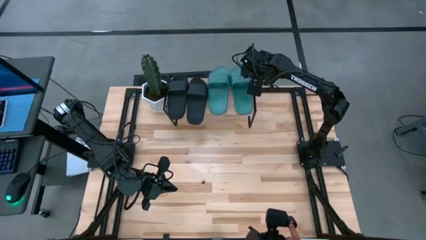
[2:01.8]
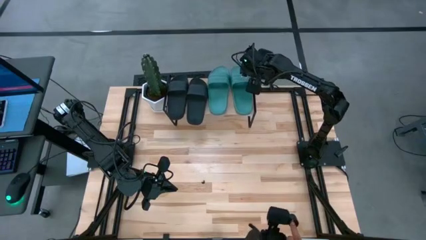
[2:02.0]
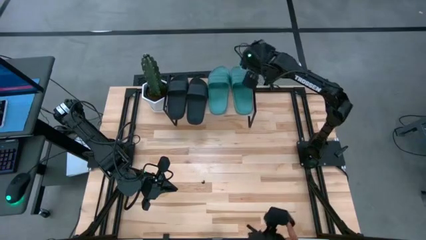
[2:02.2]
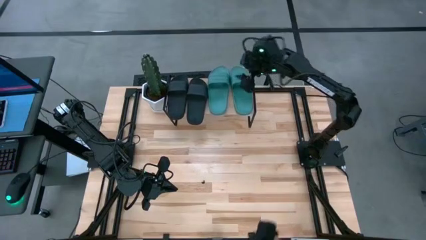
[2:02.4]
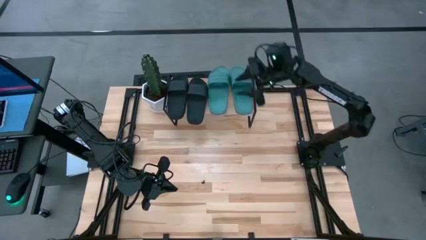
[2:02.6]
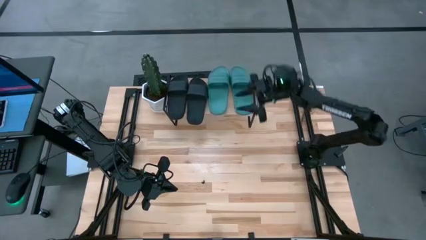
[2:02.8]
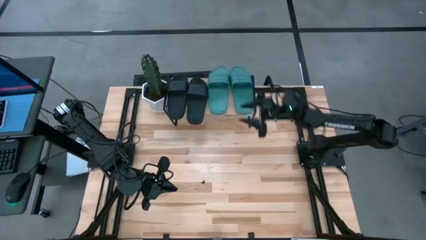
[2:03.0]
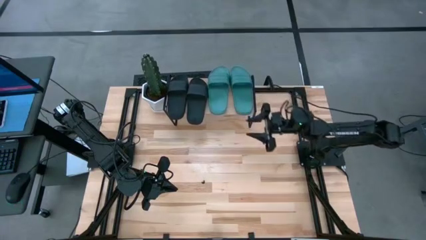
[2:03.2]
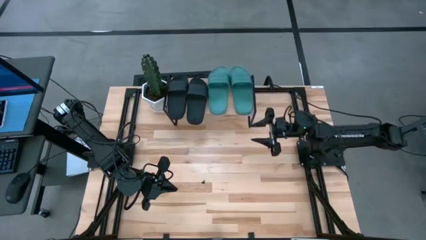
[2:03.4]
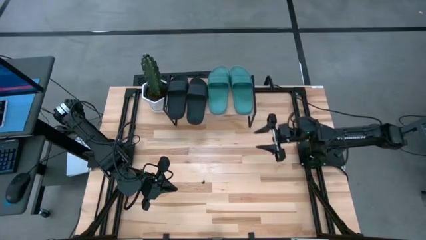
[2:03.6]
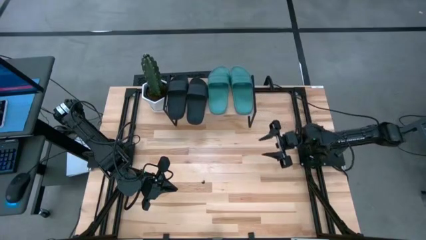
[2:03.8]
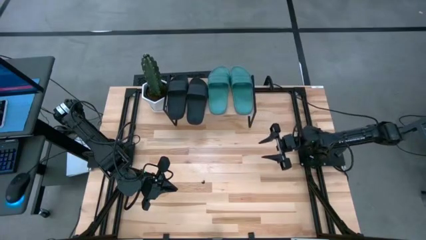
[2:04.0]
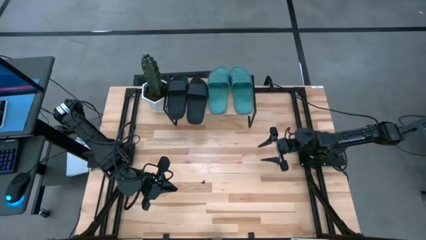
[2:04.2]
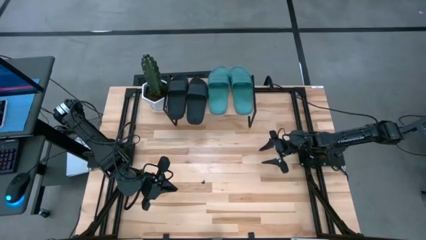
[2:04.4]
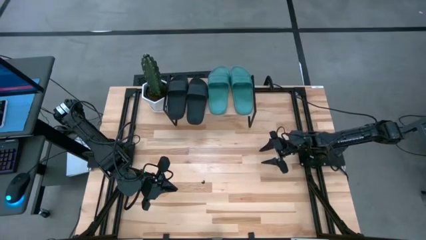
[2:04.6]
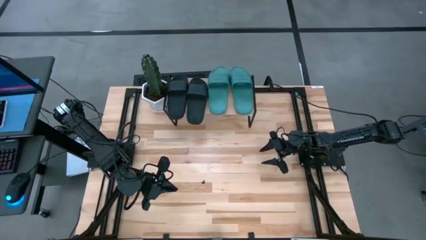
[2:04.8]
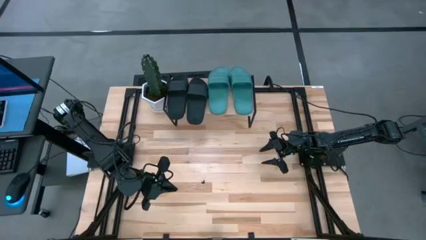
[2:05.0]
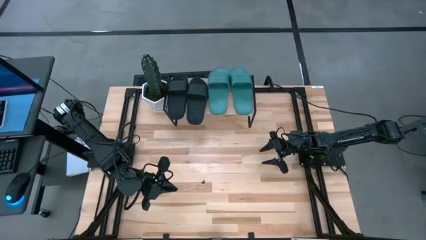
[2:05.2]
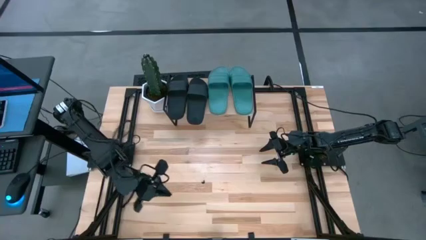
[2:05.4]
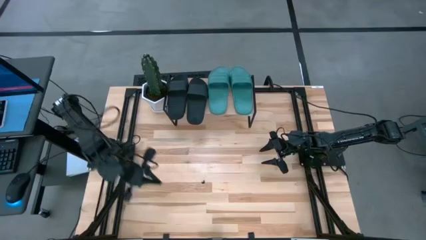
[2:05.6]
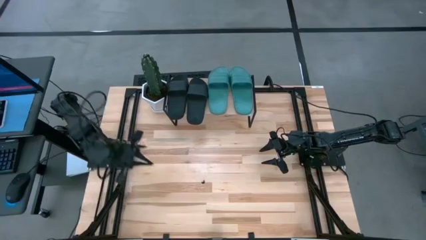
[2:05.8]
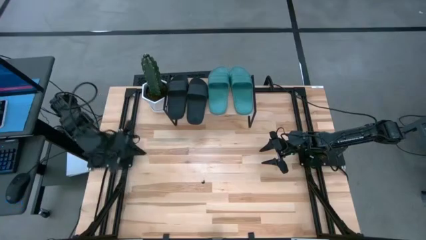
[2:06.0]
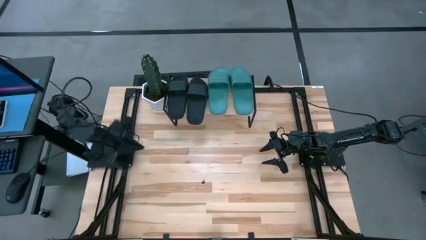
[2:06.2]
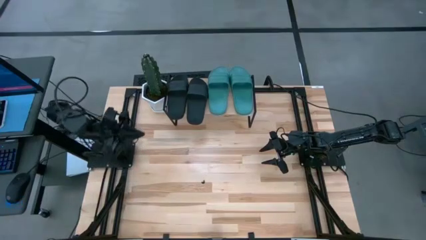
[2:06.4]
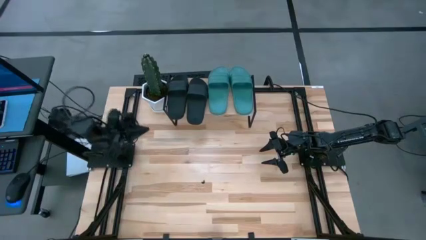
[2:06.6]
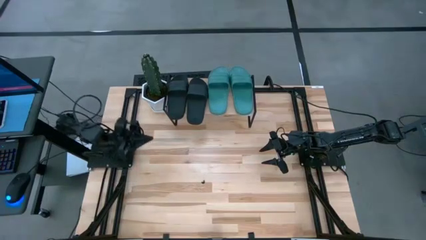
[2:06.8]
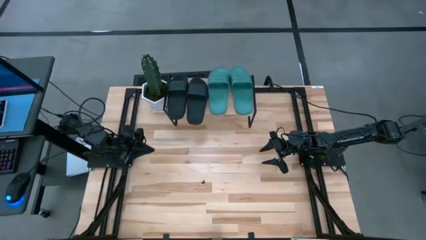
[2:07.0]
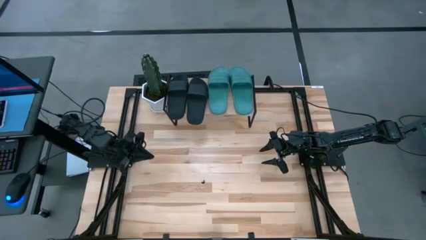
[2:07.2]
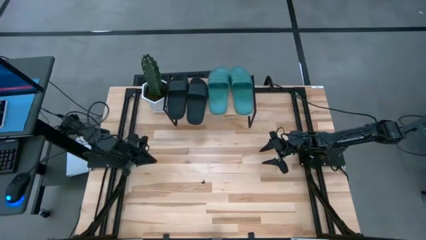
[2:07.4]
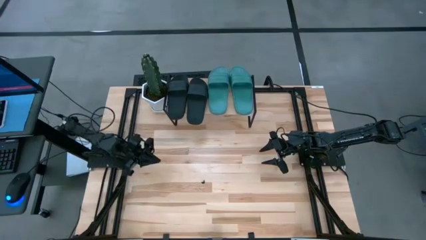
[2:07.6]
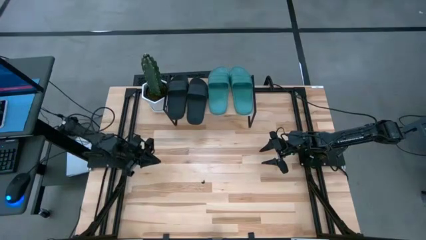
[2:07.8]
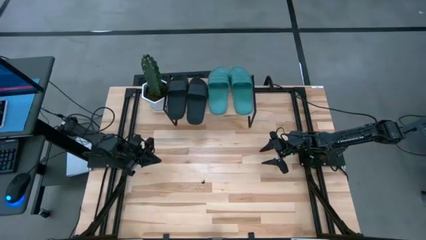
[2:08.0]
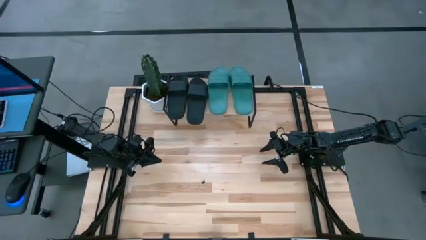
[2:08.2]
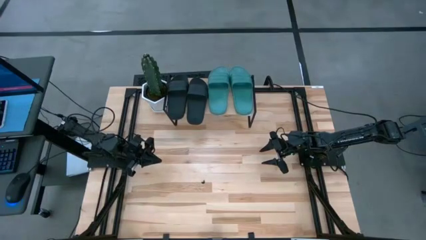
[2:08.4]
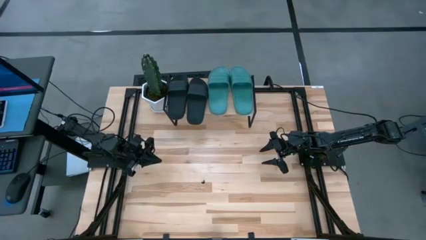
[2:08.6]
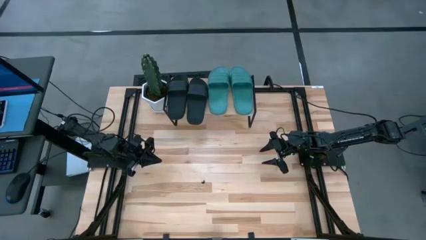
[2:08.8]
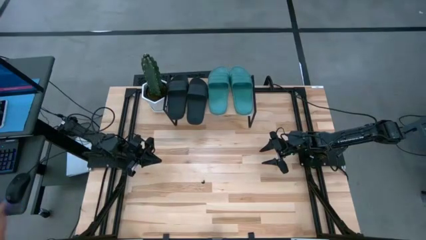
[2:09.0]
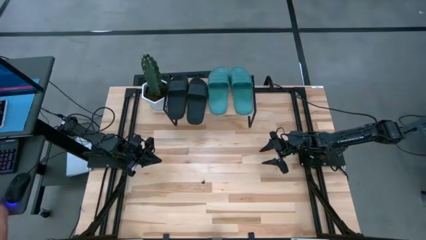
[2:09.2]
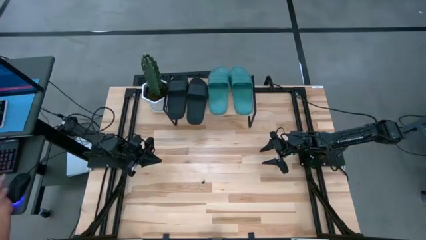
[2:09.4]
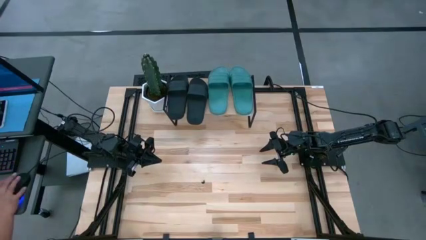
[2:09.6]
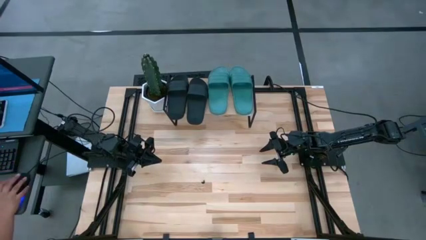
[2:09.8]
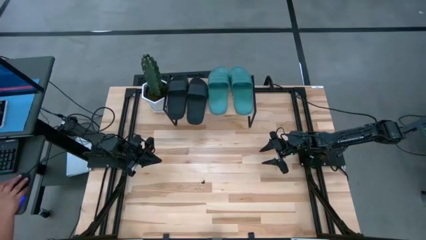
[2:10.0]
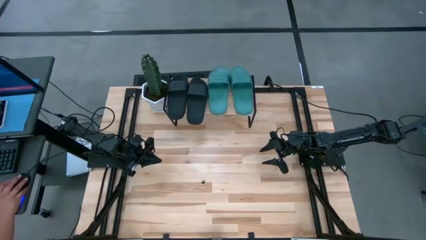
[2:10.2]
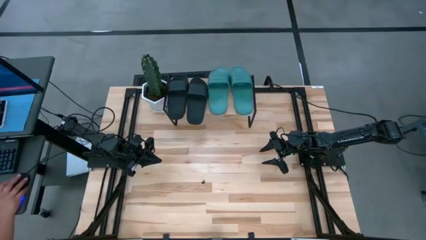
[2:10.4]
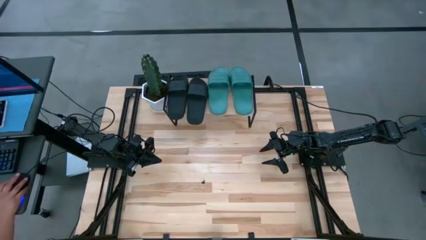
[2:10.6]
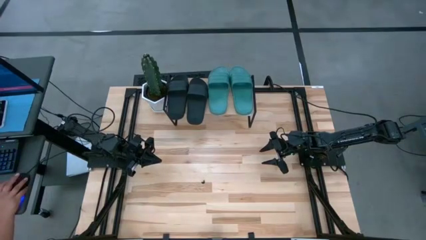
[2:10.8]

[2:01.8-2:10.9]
Task: Pick and place slides into the shelf
Return to Home Position

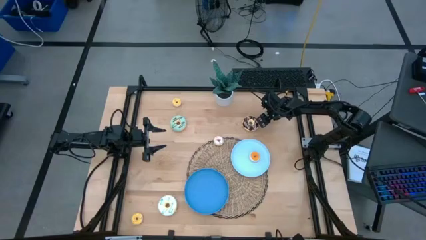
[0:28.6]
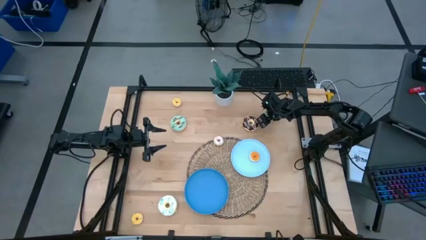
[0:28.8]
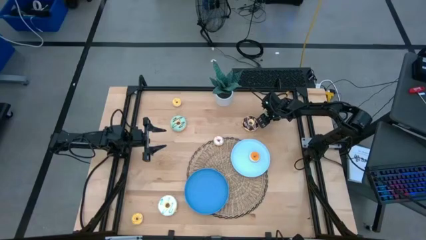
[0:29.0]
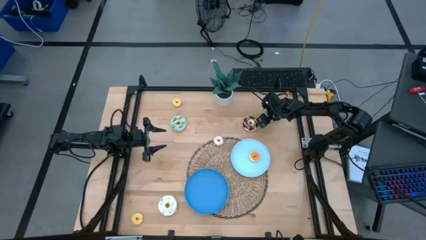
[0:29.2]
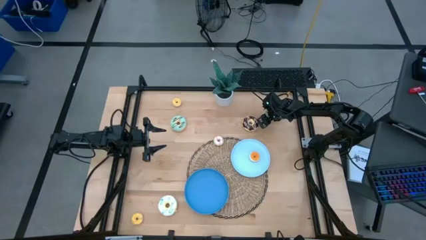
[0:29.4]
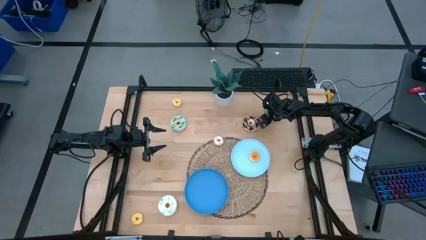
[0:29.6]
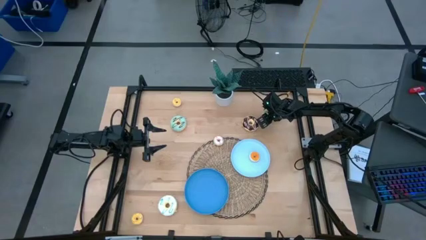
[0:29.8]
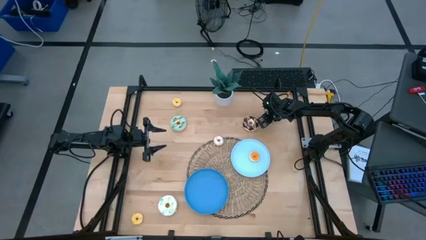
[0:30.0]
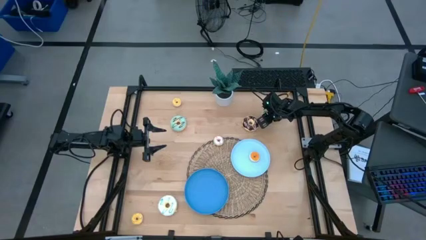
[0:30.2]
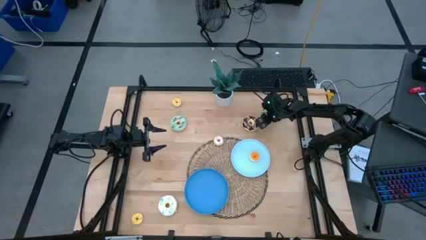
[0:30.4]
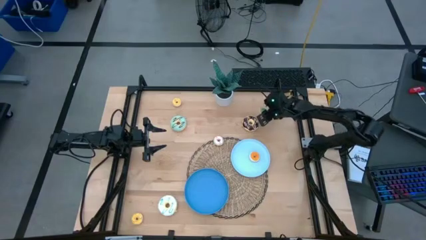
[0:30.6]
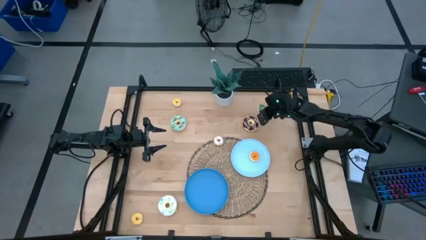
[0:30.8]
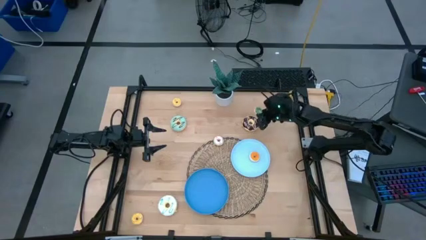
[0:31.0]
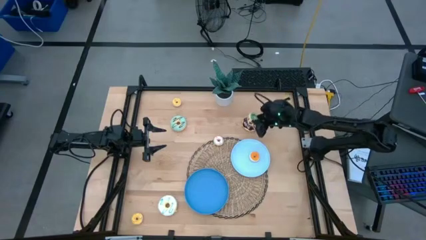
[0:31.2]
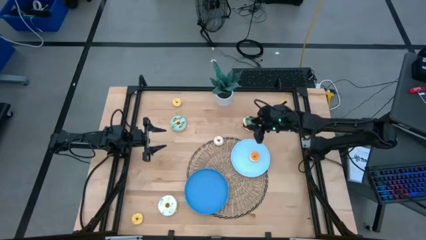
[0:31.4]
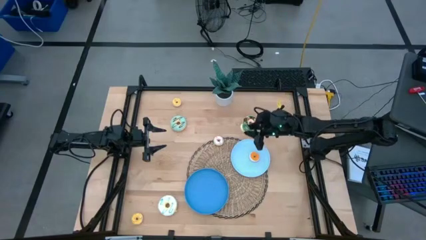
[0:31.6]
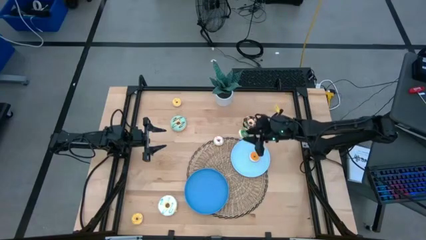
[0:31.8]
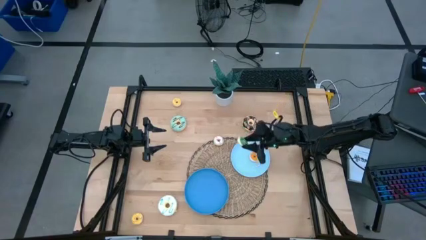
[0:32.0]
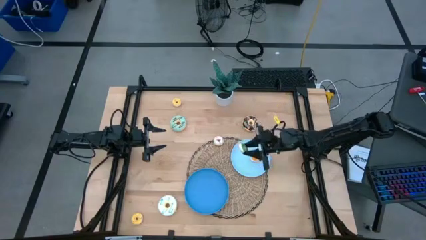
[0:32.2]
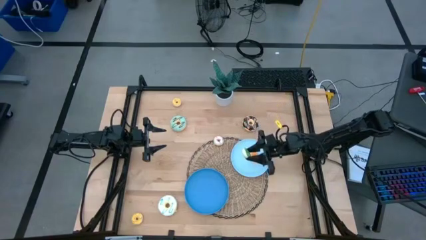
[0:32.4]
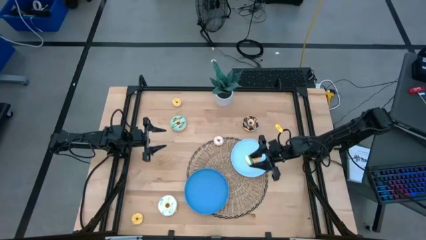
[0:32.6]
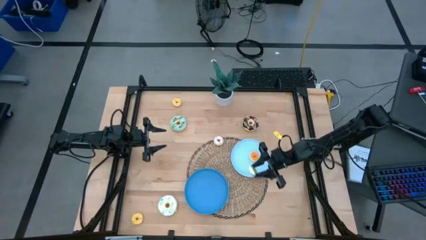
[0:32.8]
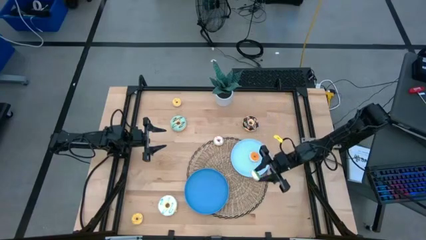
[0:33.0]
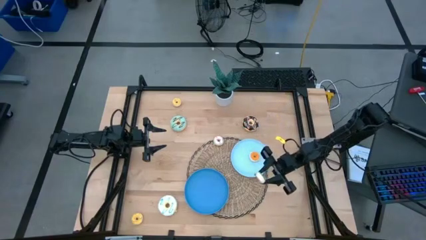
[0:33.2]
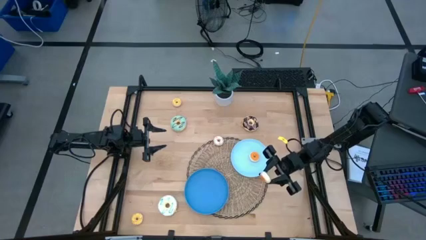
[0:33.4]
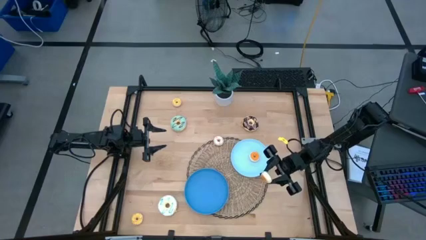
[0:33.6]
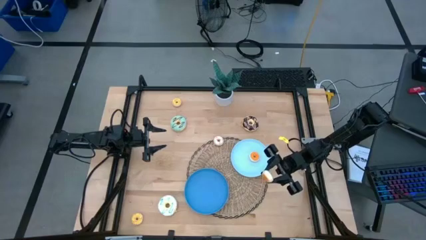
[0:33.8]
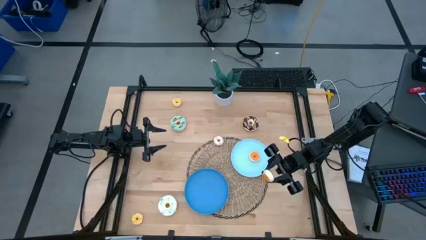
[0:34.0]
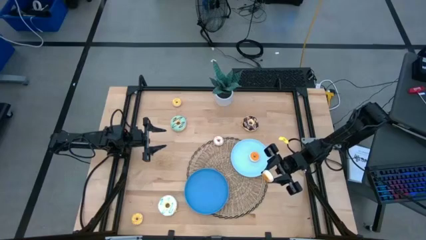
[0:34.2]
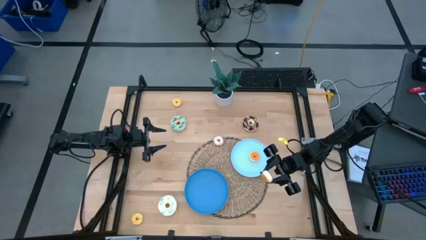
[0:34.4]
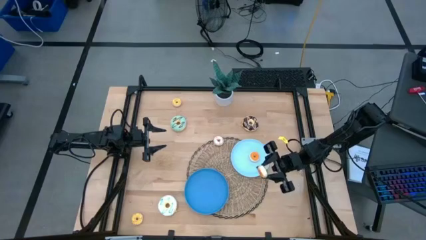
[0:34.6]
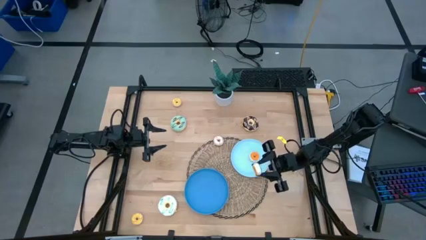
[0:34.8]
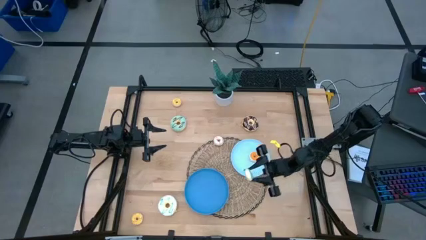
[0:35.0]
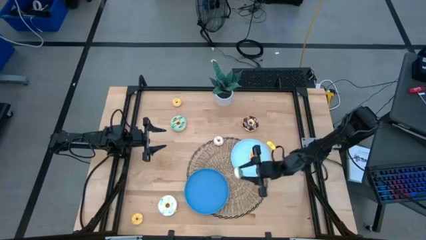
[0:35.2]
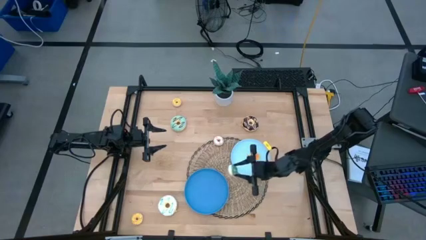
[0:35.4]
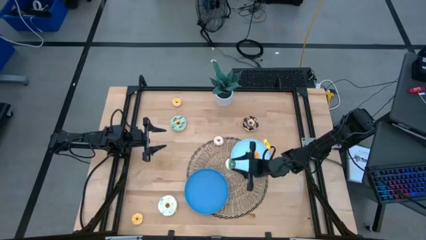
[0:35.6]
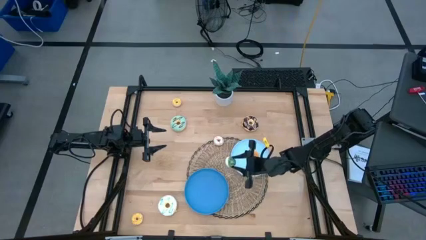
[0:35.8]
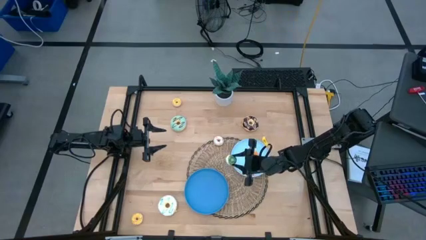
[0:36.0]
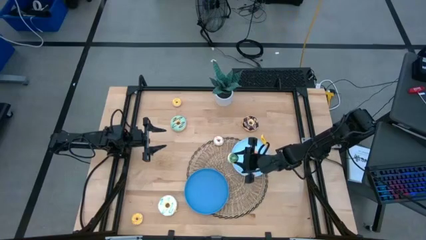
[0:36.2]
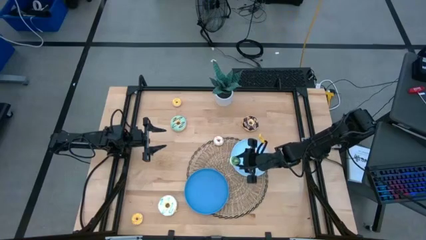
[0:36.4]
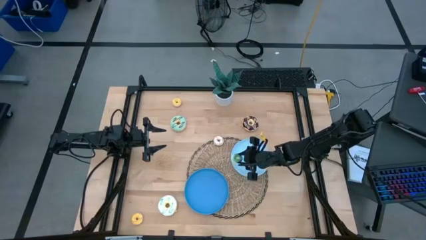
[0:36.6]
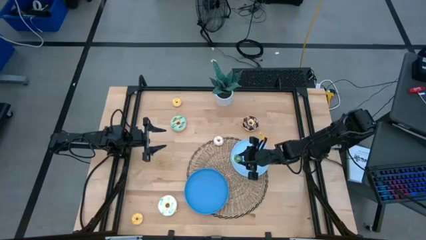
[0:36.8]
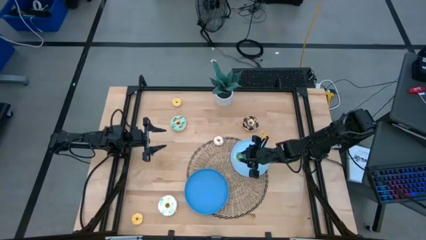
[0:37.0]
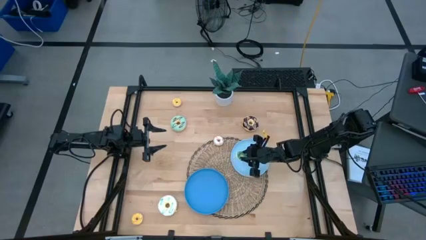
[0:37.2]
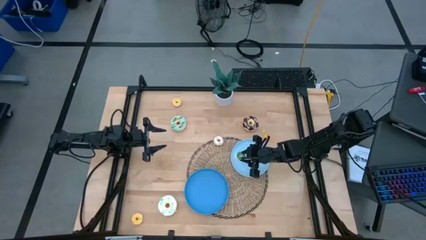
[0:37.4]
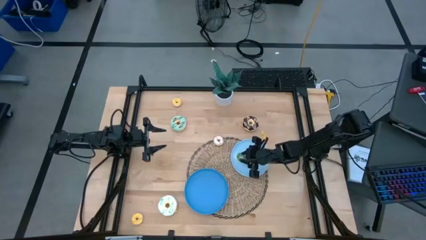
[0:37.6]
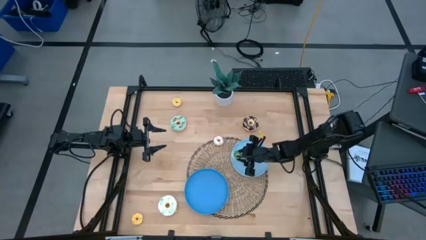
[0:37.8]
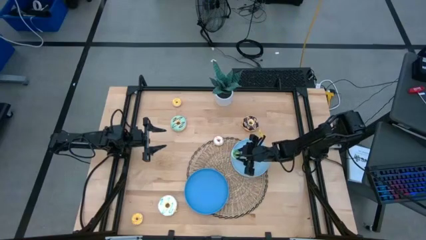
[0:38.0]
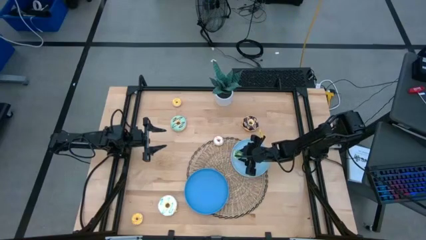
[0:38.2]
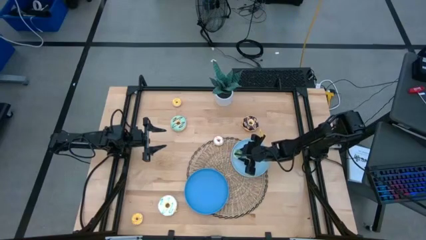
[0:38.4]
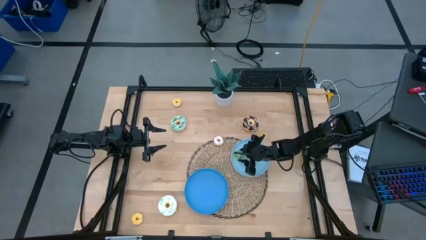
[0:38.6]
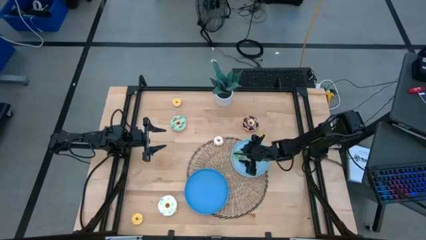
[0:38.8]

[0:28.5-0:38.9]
Task: Pick & Place donuts
Put the small green donut on the light blue plate
